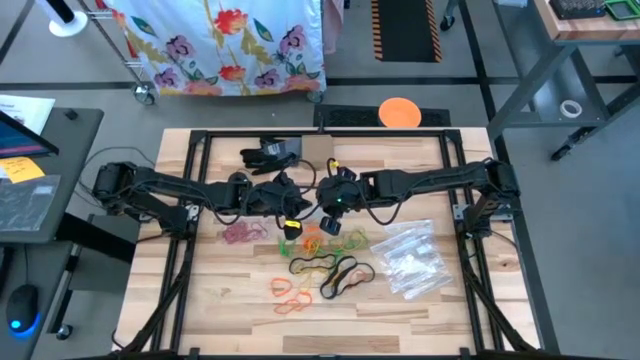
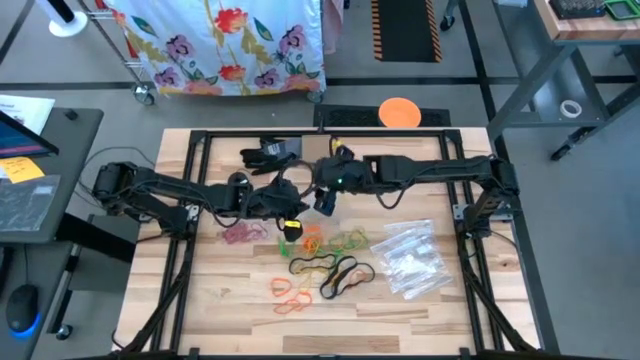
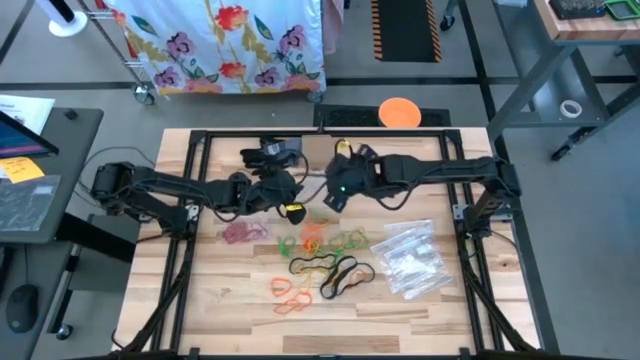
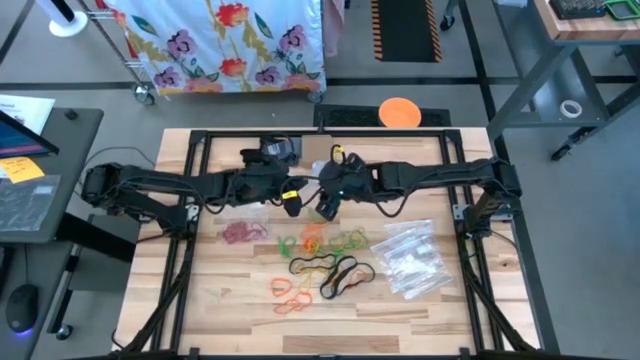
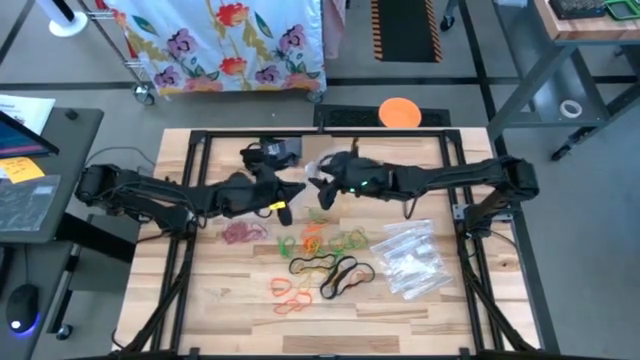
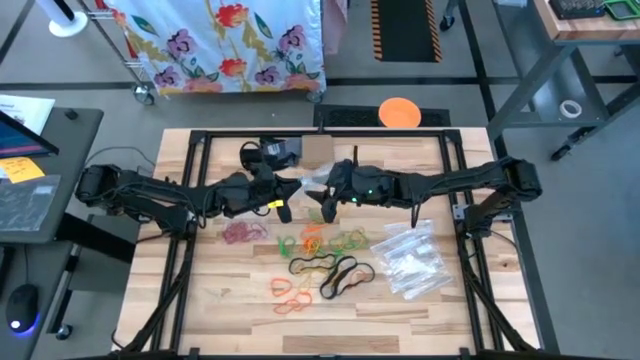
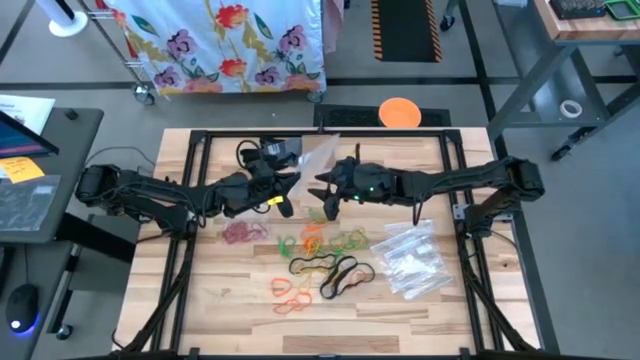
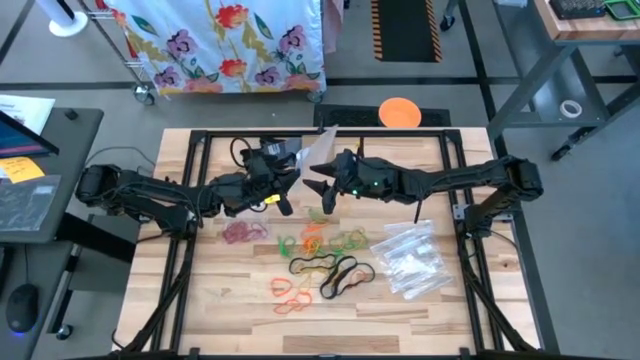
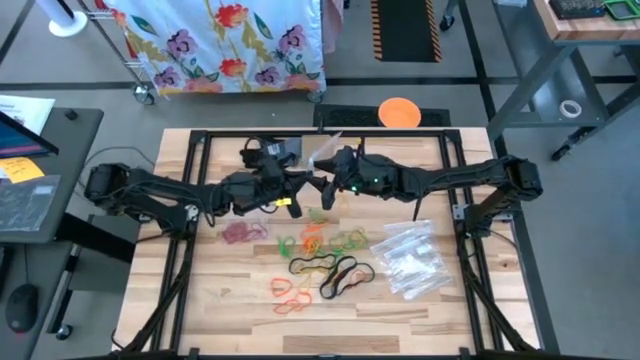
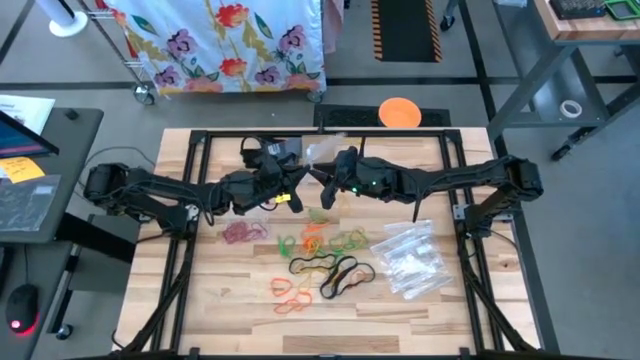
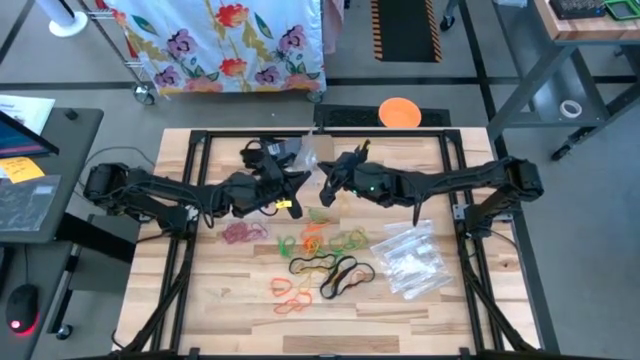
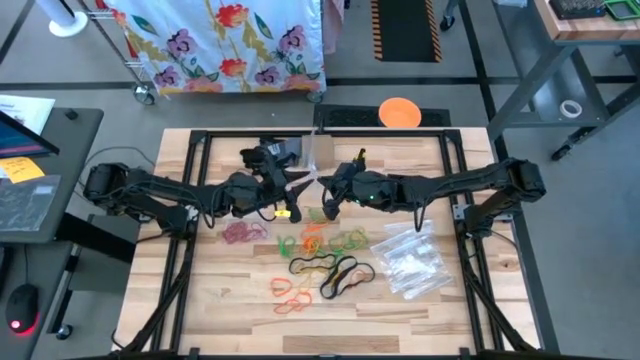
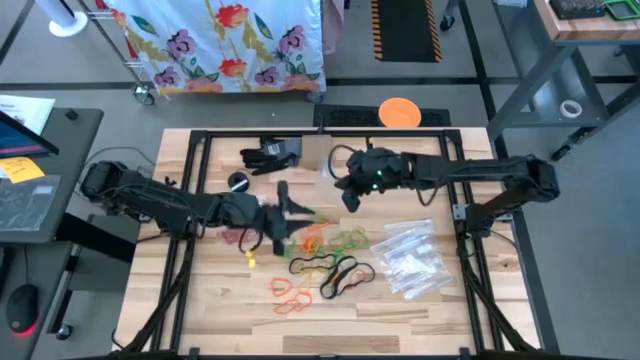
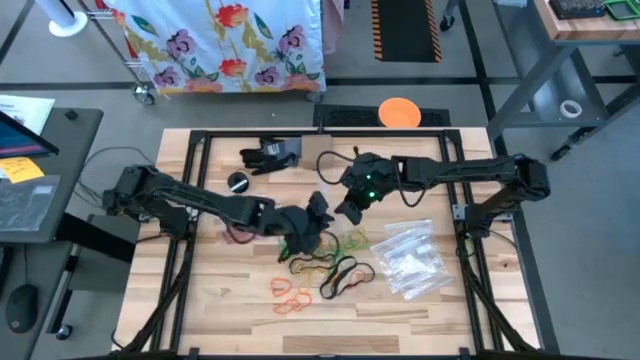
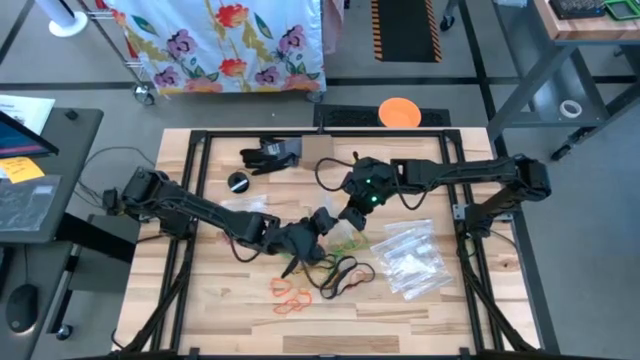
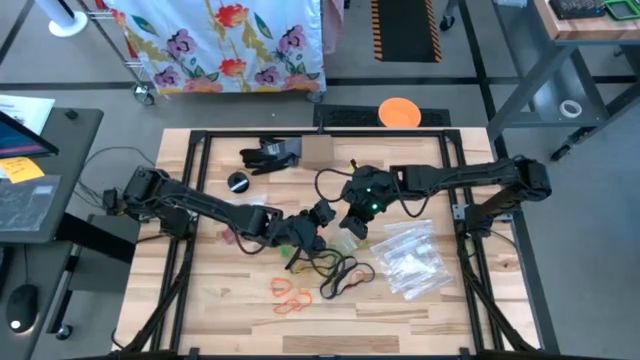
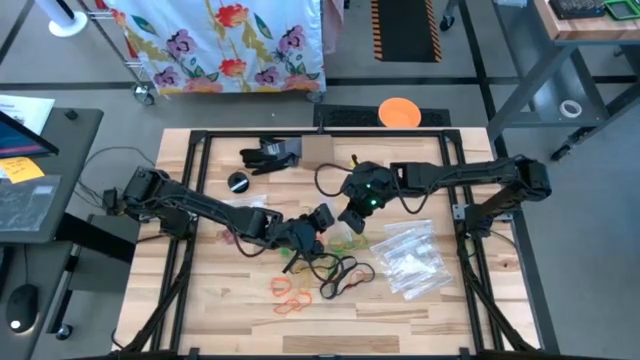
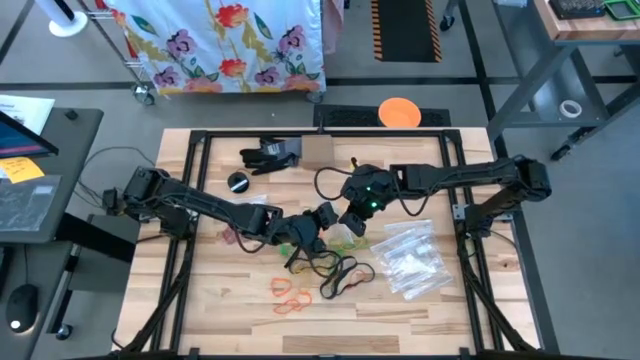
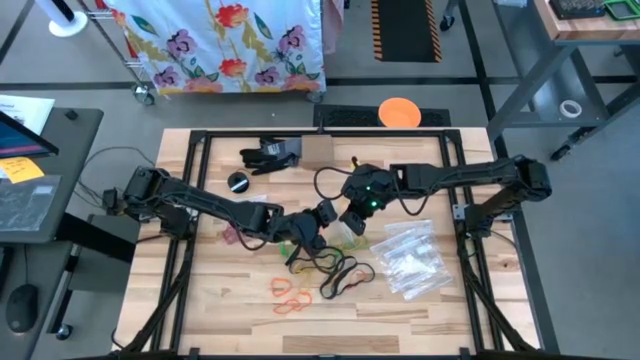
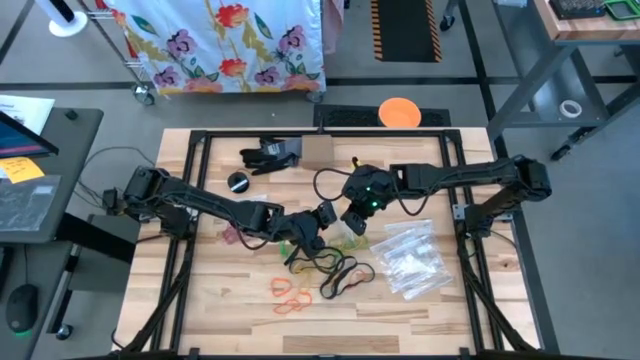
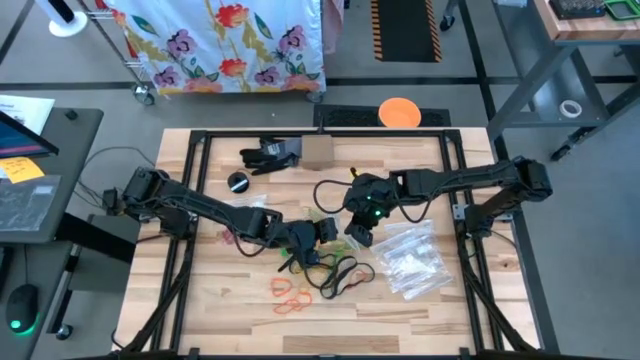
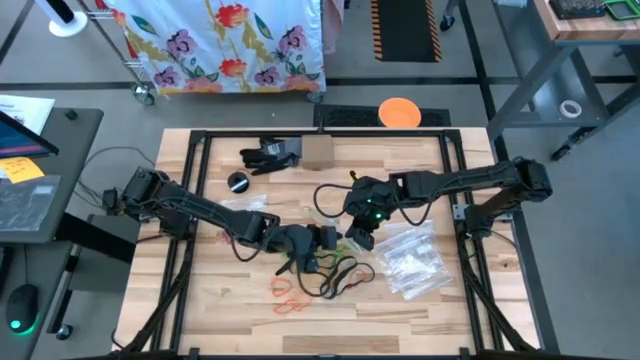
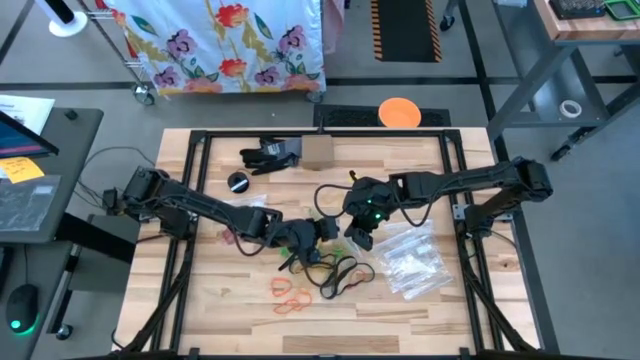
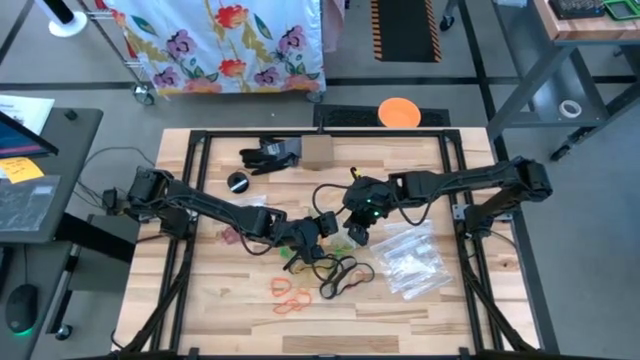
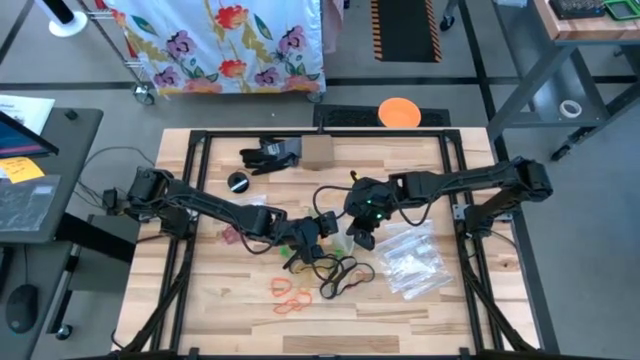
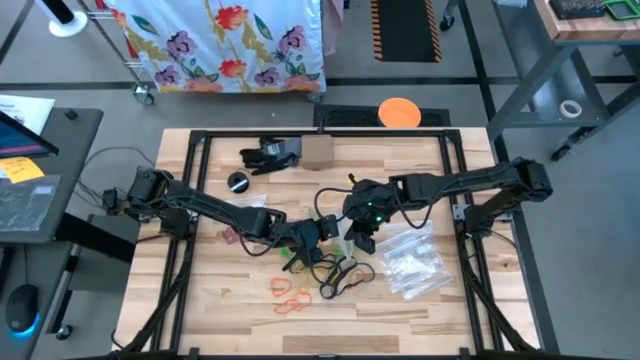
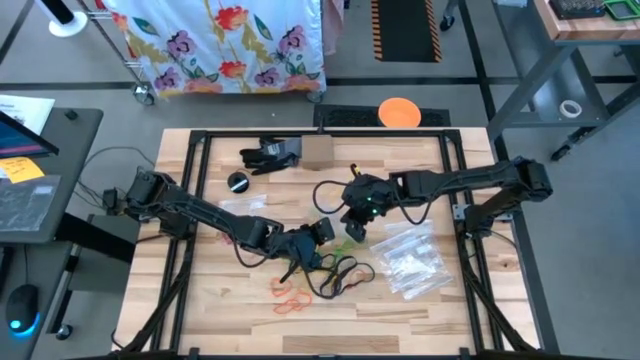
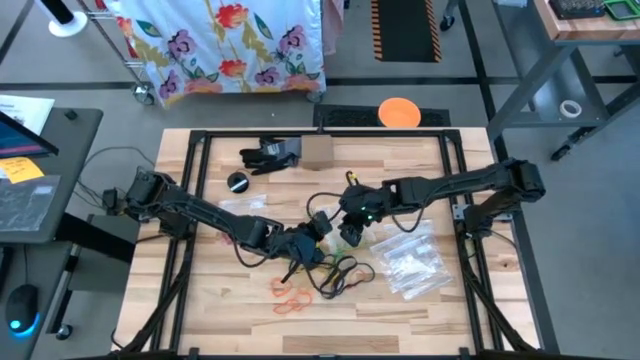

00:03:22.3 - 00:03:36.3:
Task: Sort rubber bands
Open the transparent zip bag

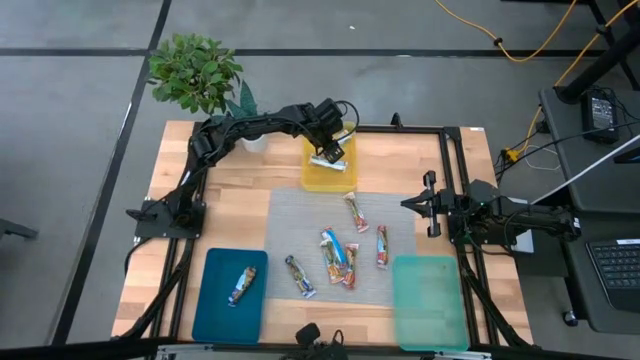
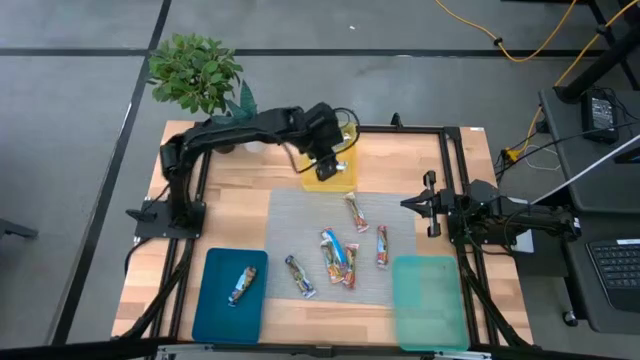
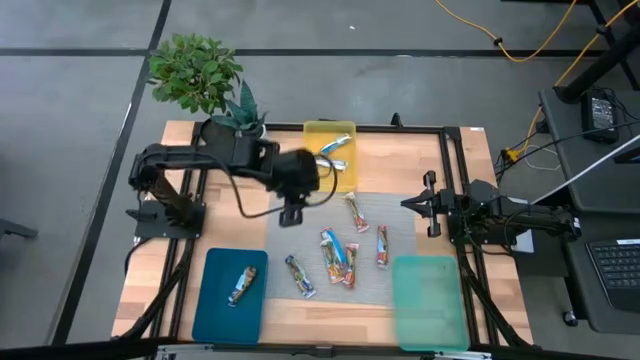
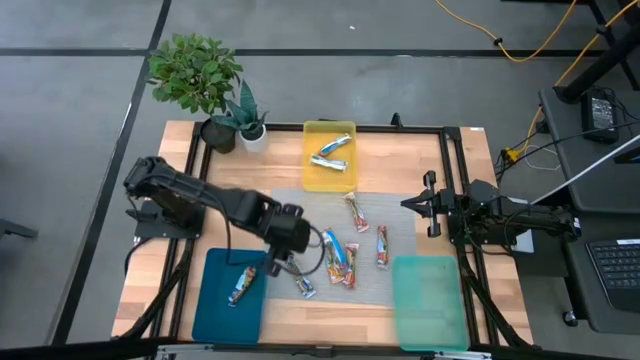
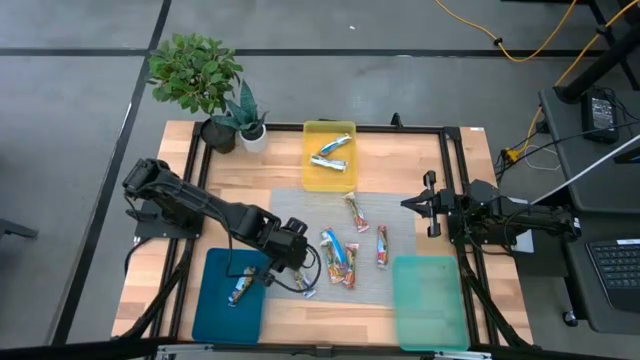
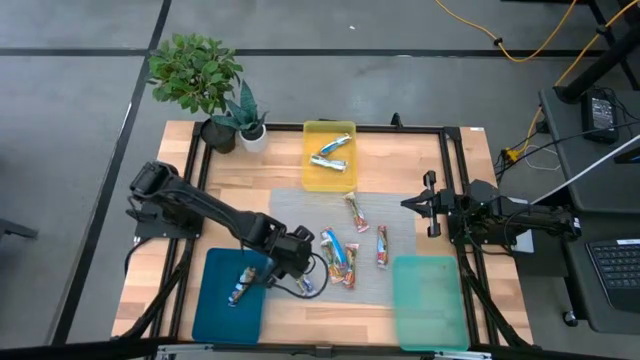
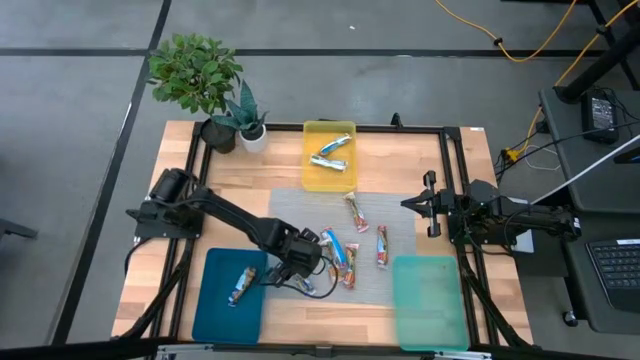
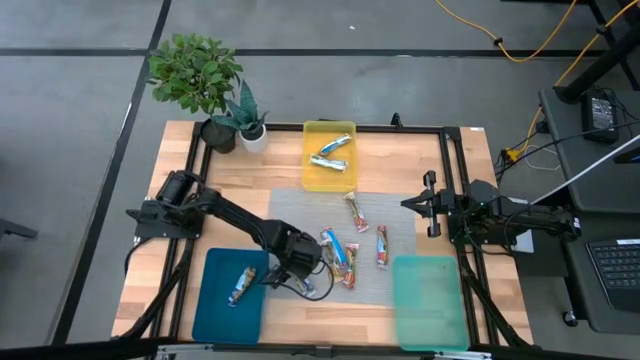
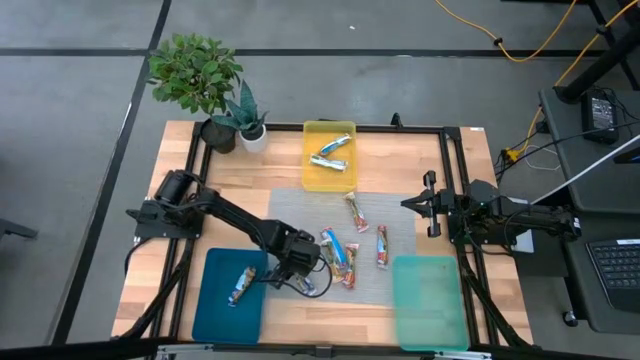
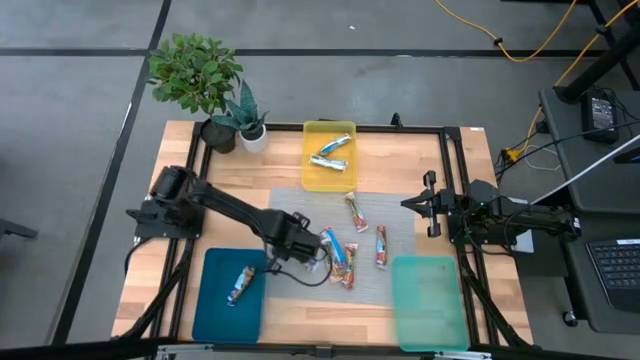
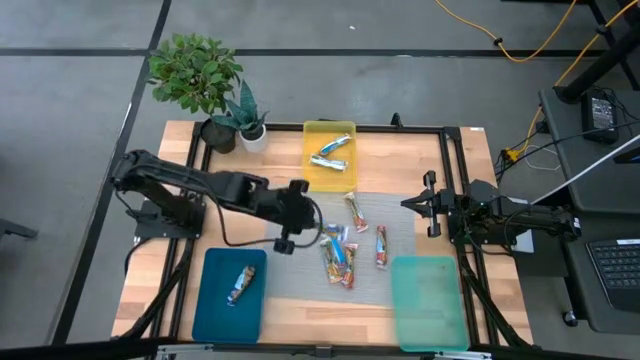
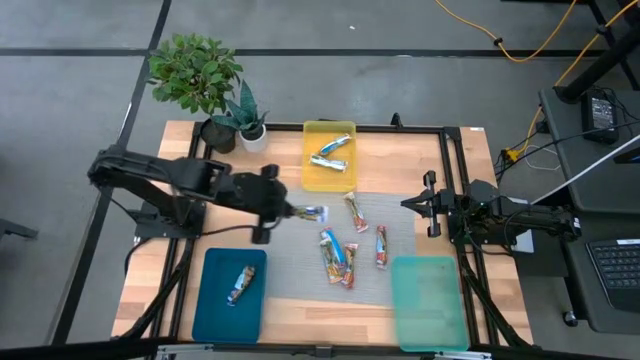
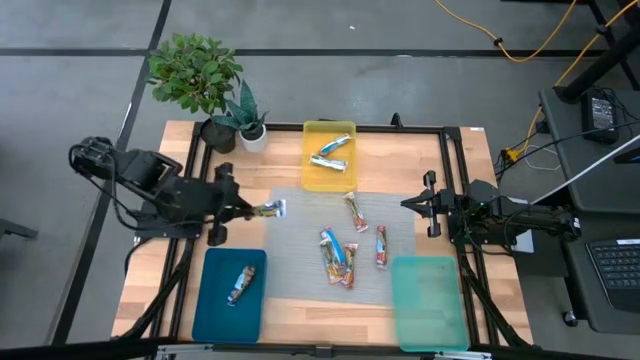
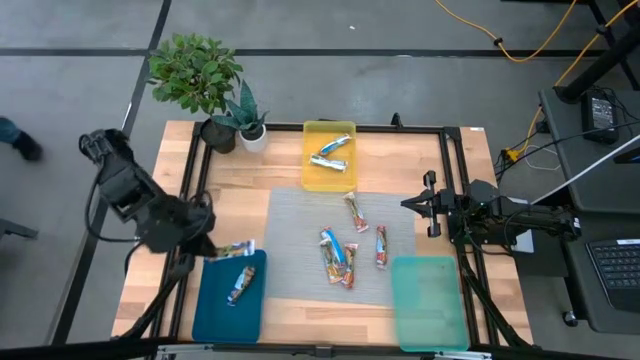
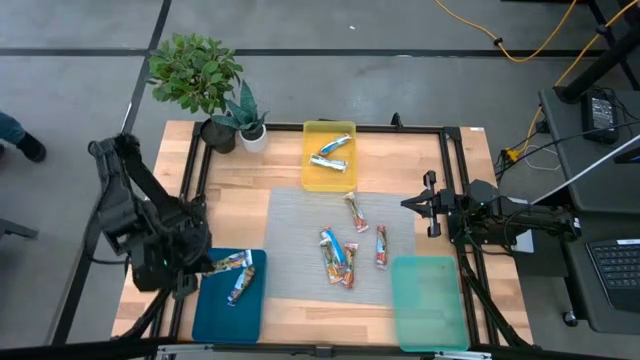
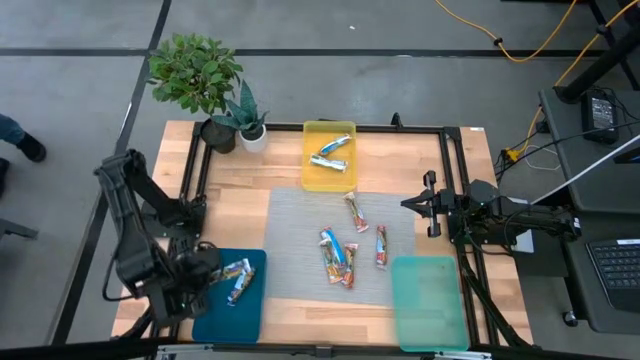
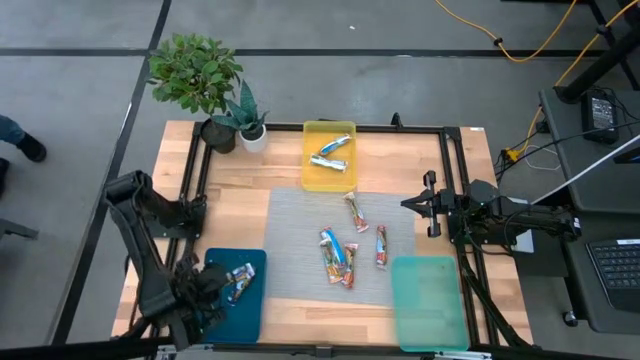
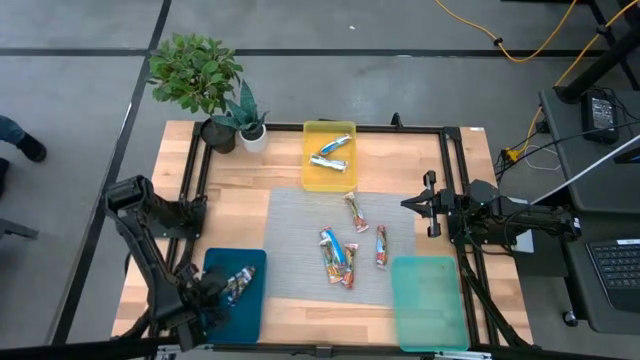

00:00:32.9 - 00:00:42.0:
Task: Pick and place Granola Bars by type
Put the blue granola bar into the blue bin
